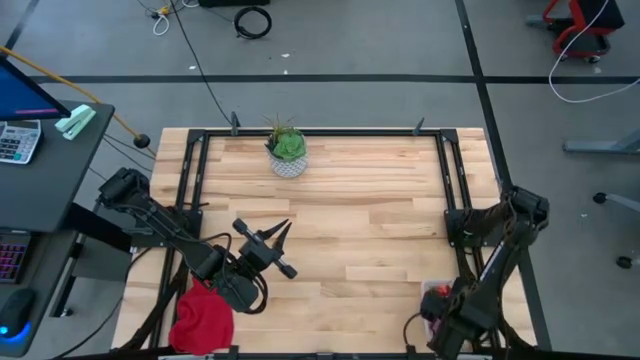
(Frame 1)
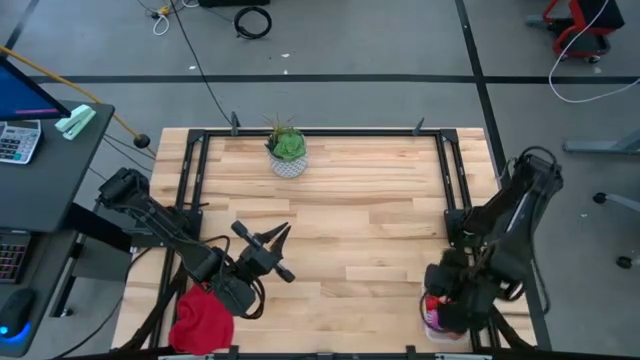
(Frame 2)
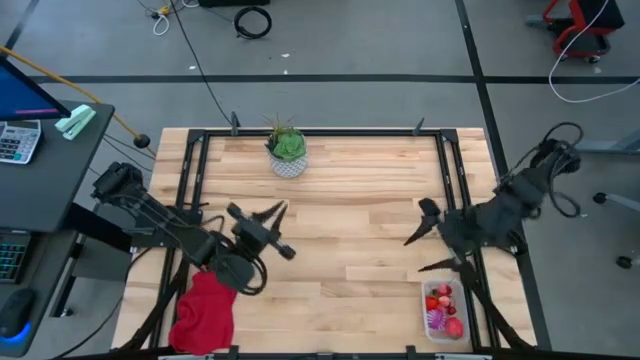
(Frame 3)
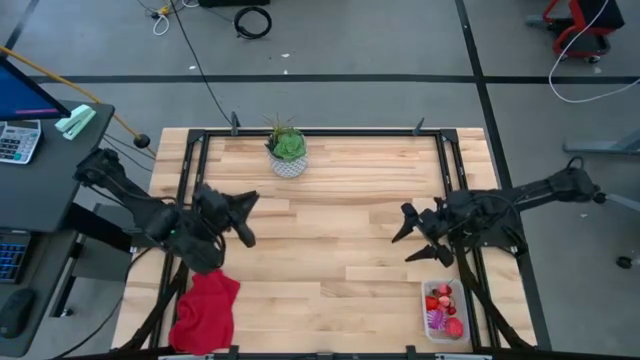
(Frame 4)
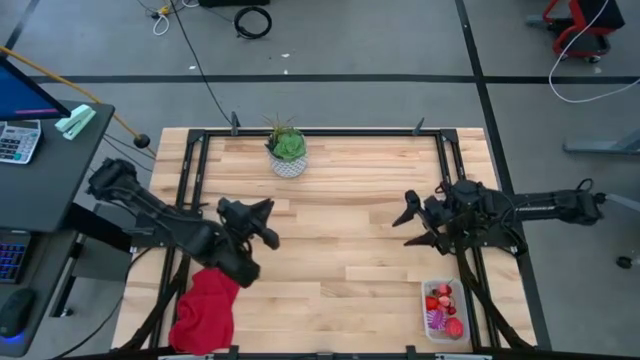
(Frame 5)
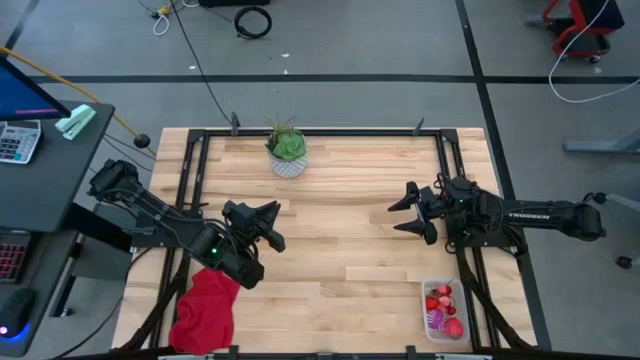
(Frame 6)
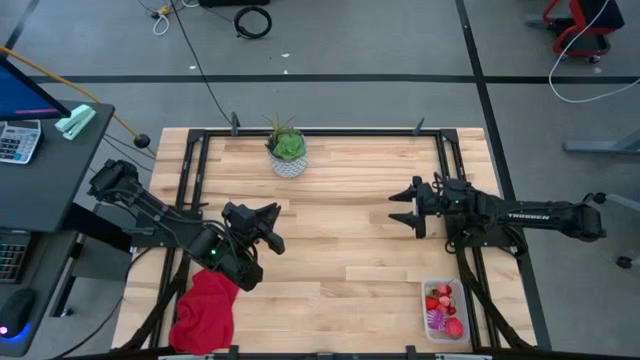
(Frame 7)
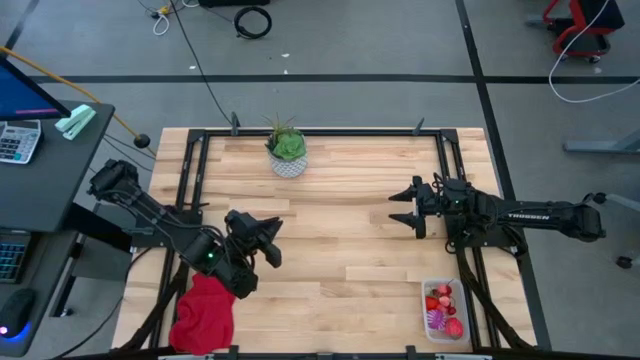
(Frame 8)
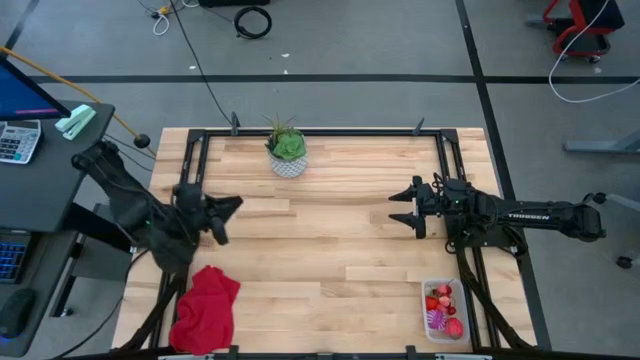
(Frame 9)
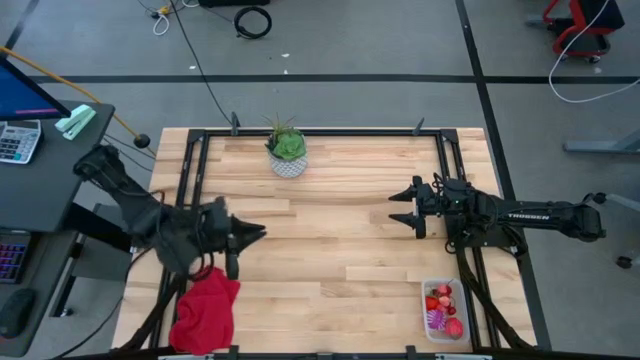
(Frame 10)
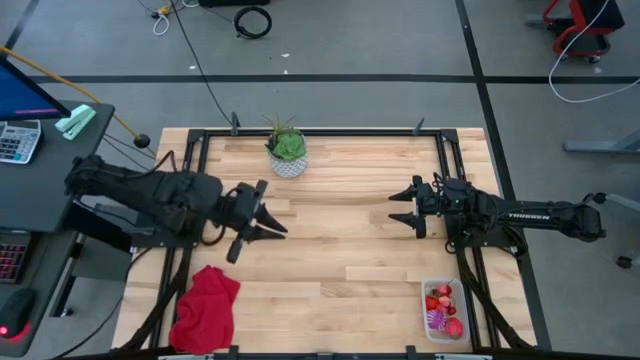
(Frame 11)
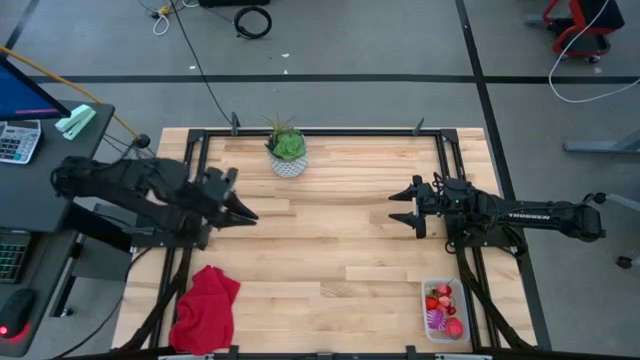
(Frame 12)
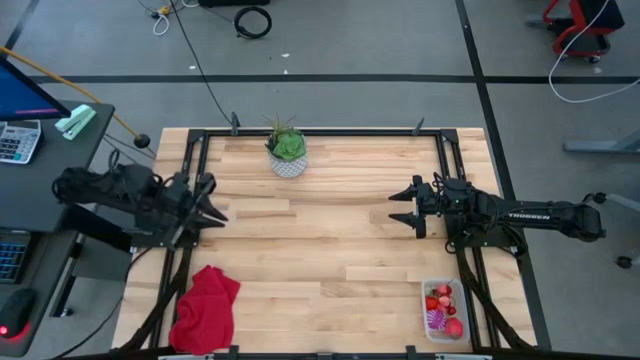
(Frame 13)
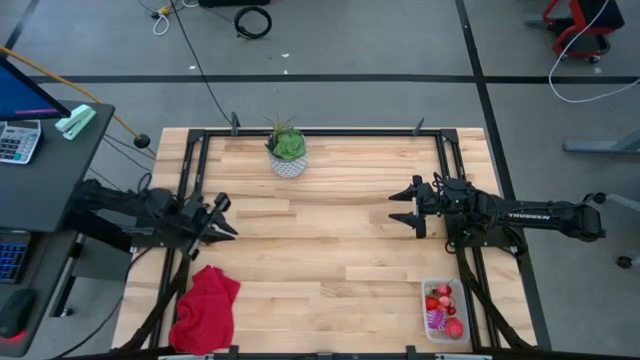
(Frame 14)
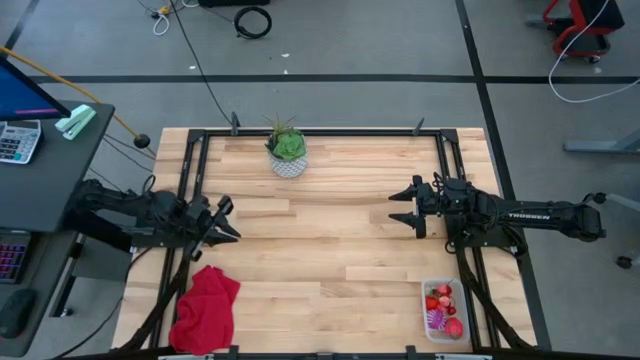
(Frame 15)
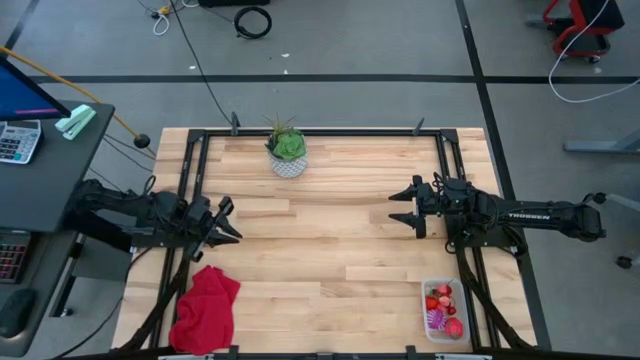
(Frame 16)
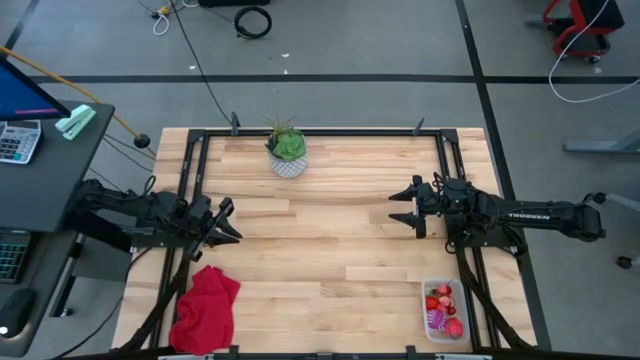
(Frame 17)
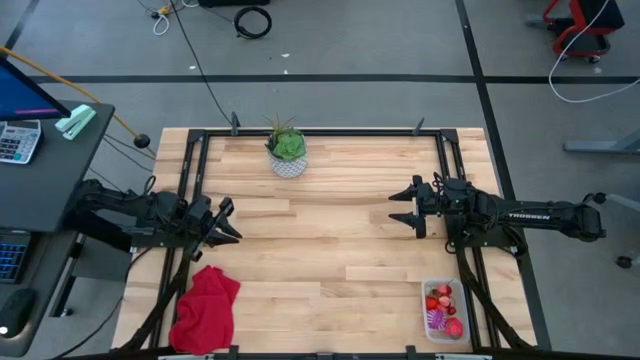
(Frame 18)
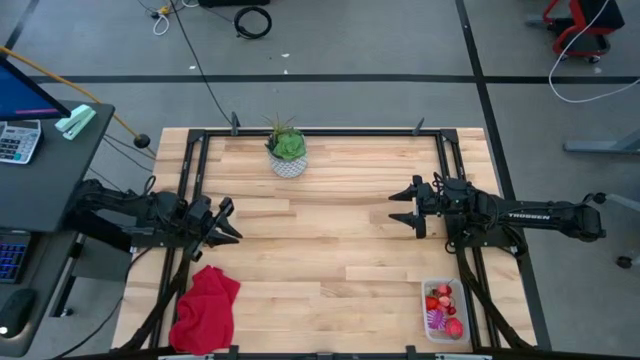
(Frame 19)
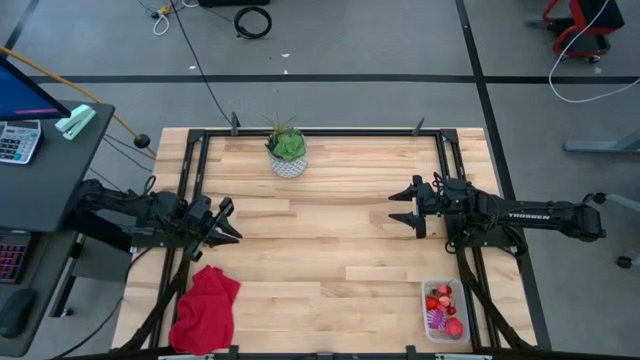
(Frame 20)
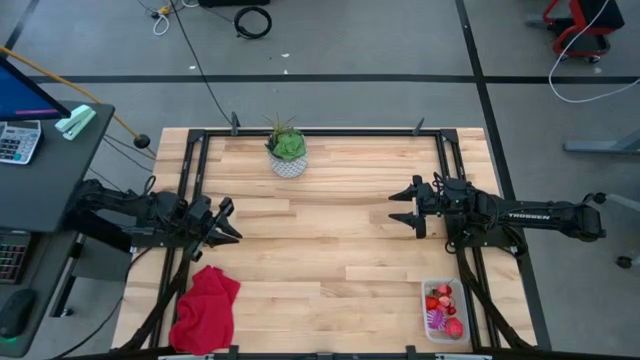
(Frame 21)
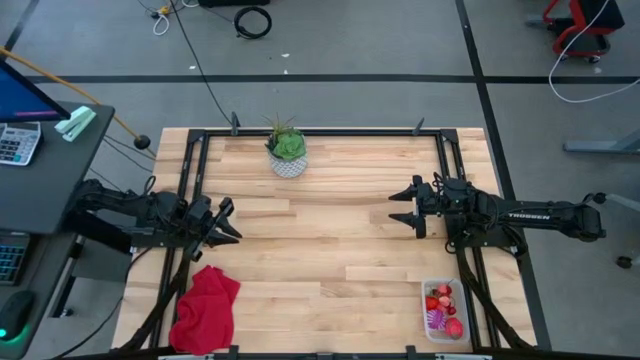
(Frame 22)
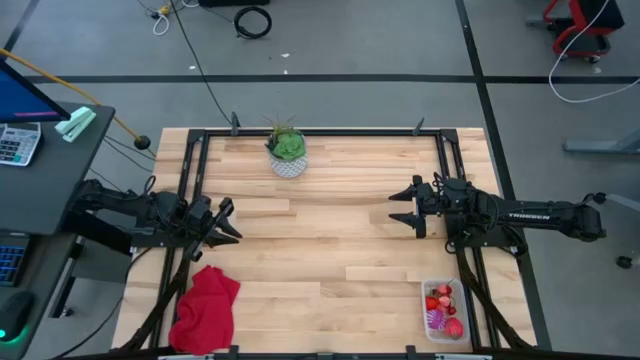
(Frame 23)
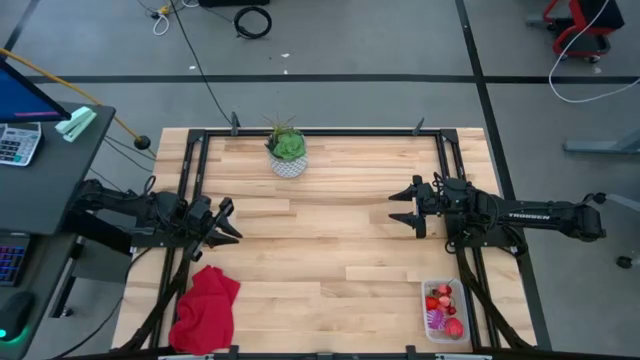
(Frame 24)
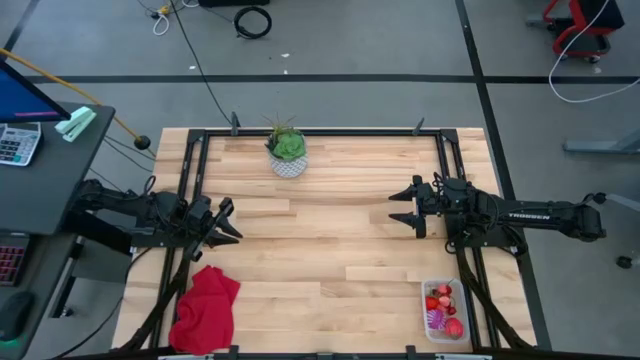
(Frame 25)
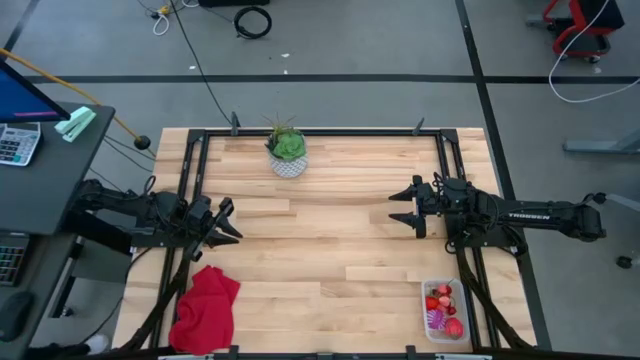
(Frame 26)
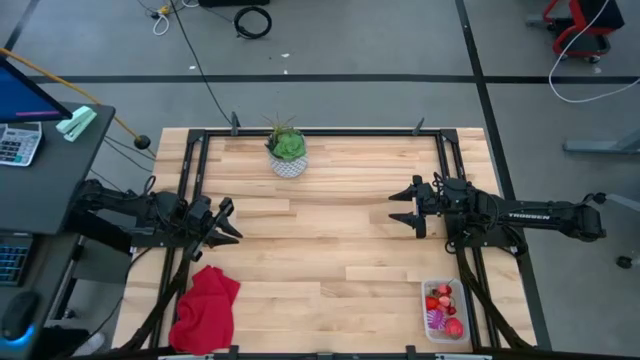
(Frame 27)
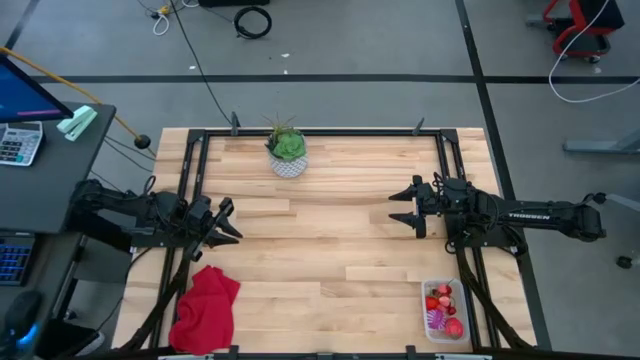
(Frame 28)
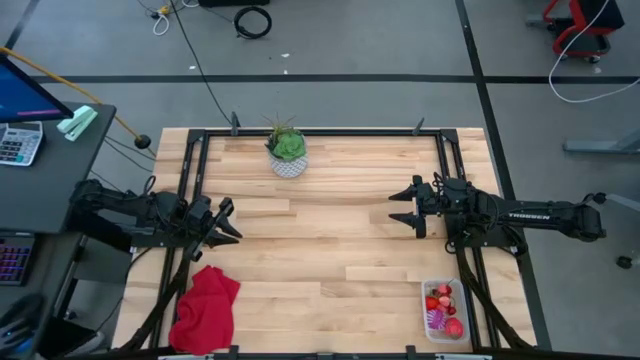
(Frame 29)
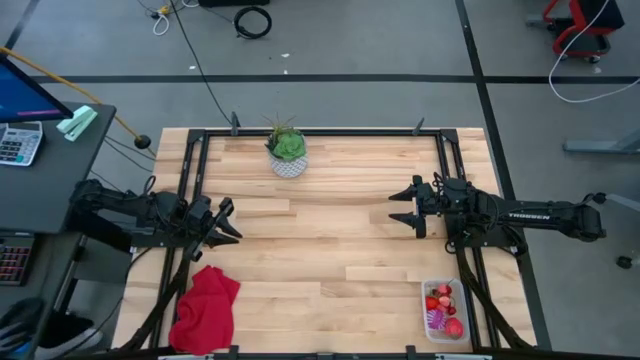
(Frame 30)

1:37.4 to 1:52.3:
Task: Pick and placing Produce into tupperware
Return to Home Position

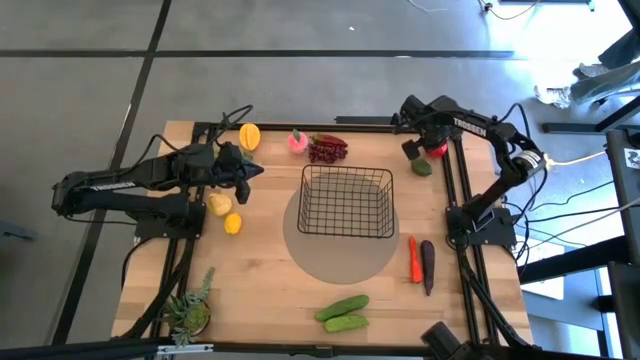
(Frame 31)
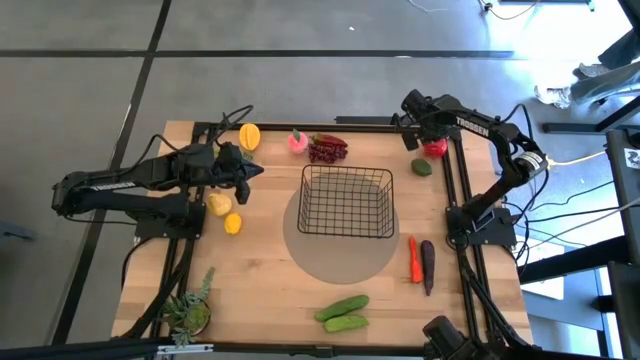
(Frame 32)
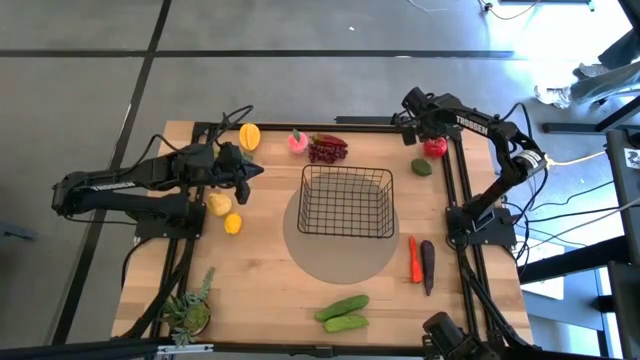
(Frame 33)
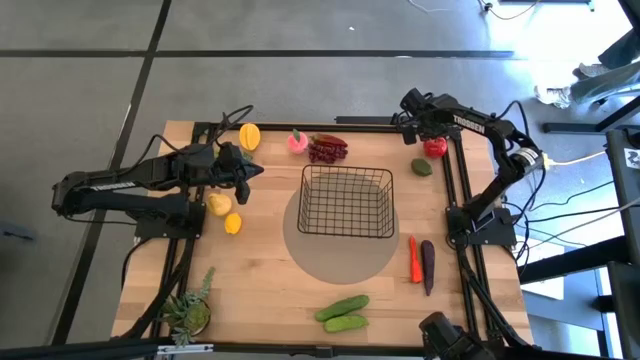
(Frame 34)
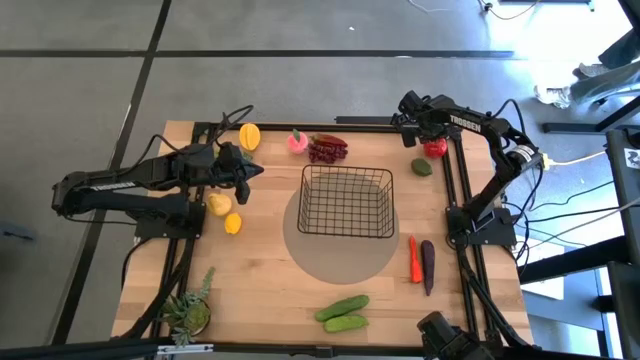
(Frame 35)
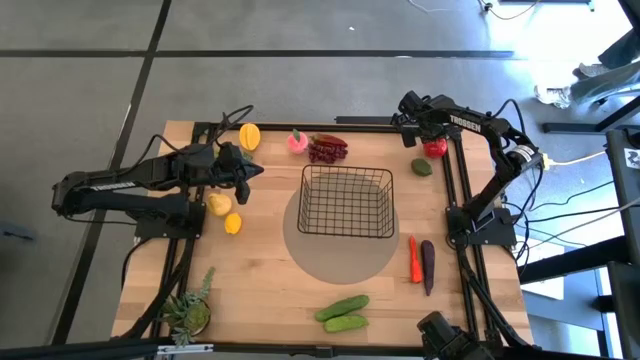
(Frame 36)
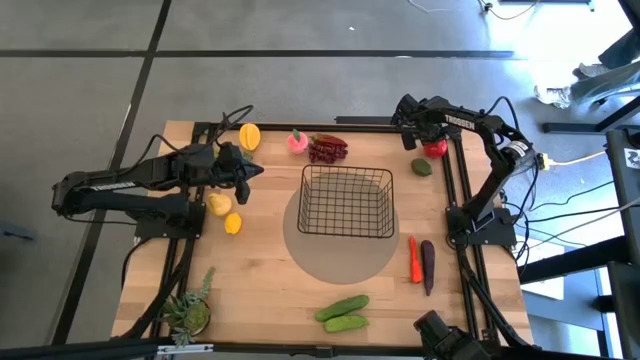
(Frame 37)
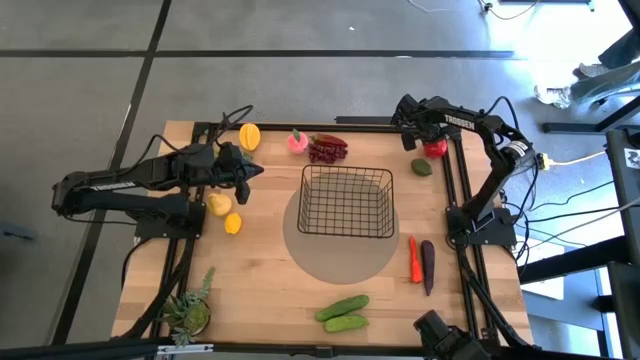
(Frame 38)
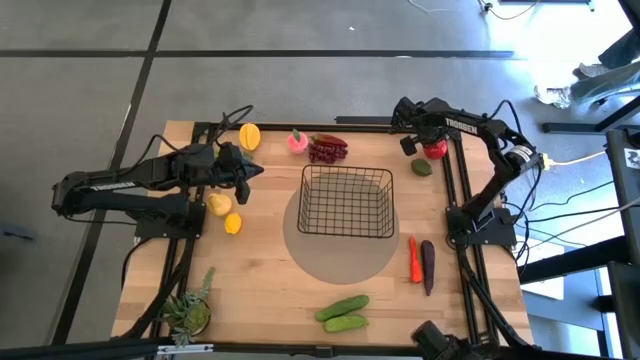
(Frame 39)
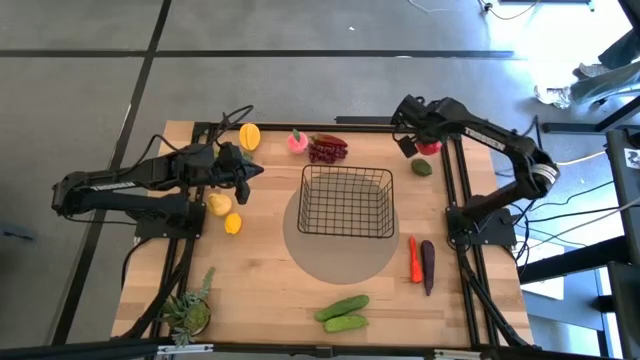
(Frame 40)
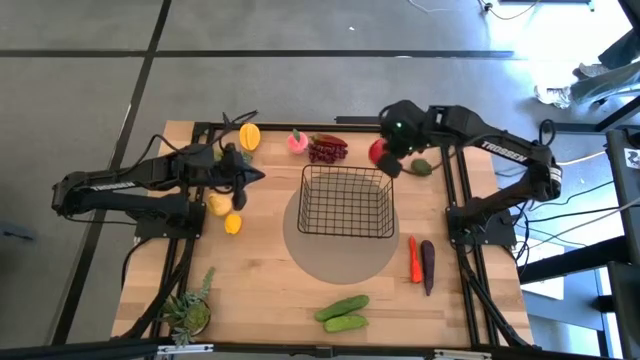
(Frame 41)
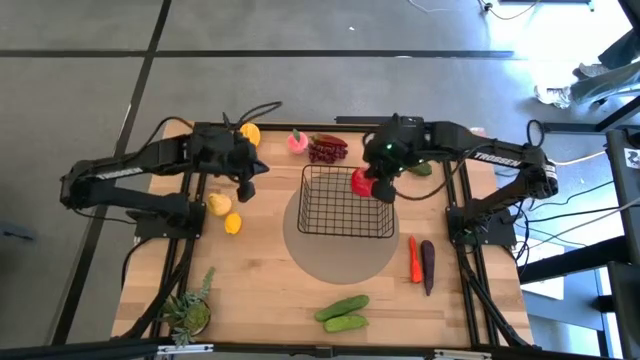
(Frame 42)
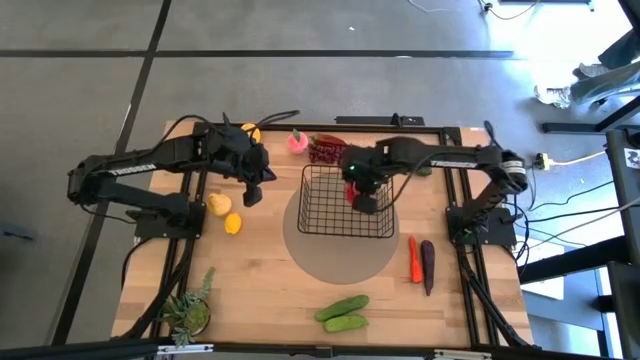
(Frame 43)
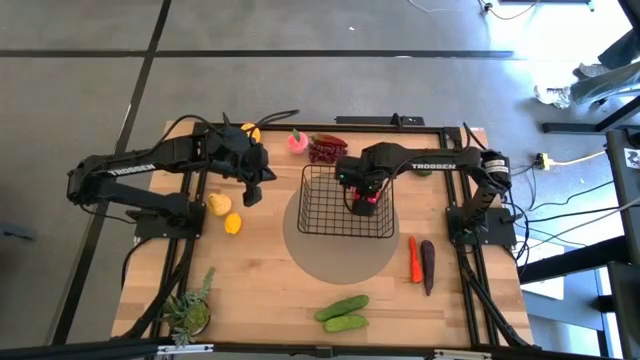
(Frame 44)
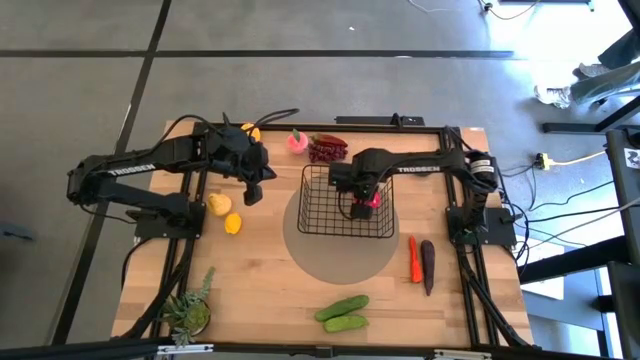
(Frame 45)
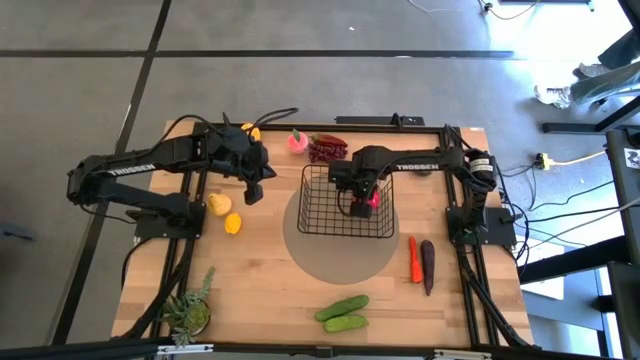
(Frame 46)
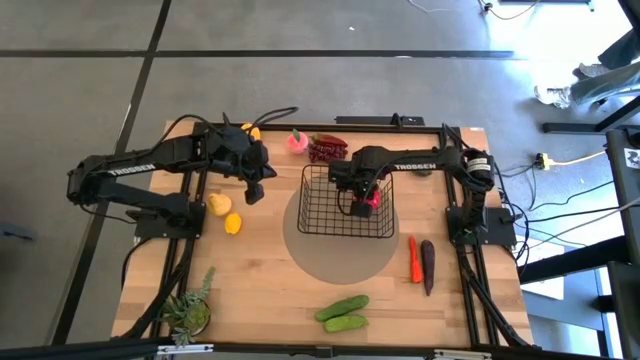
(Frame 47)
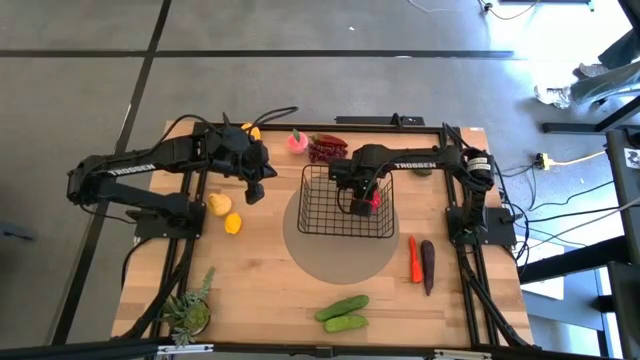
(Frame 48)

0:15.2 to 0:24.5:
Task: Build produce basket
Put the red apple into the black wire basket
